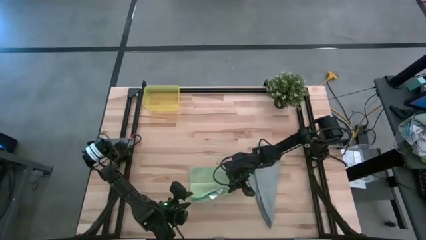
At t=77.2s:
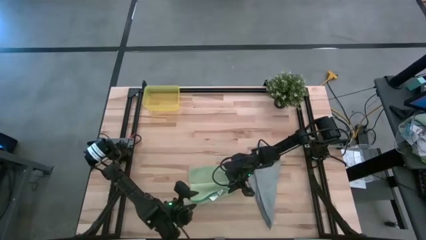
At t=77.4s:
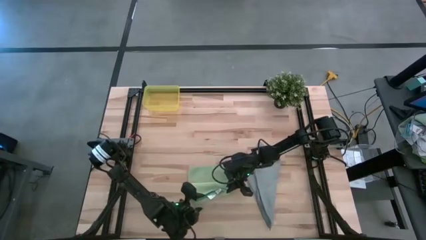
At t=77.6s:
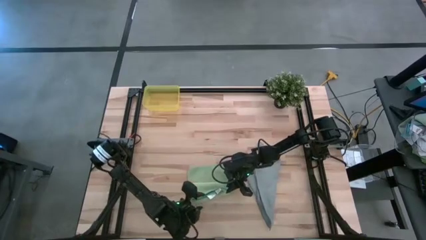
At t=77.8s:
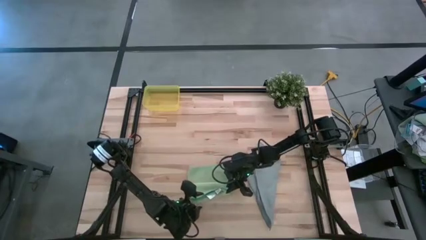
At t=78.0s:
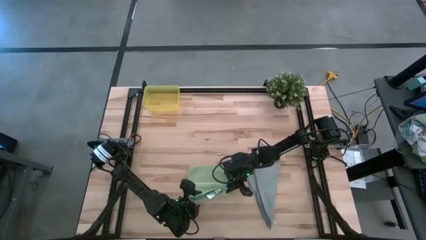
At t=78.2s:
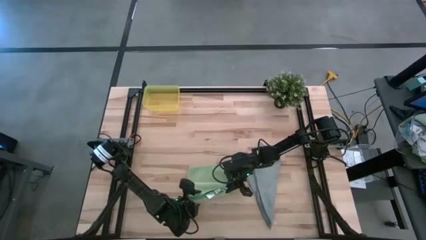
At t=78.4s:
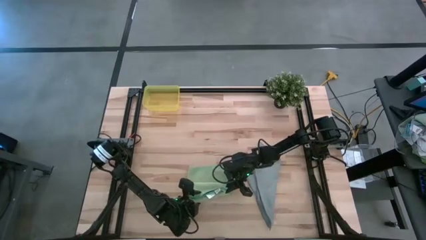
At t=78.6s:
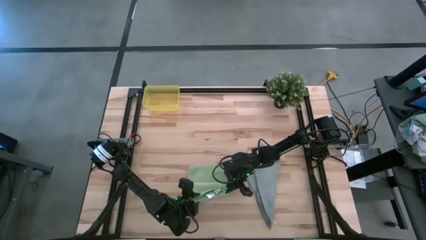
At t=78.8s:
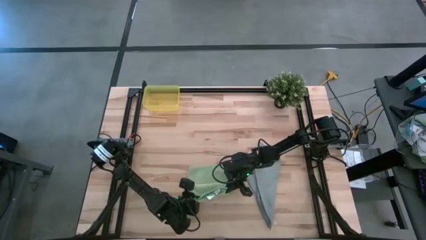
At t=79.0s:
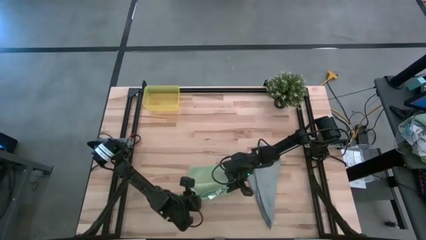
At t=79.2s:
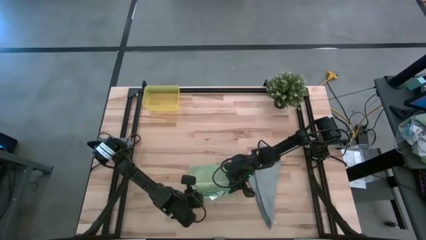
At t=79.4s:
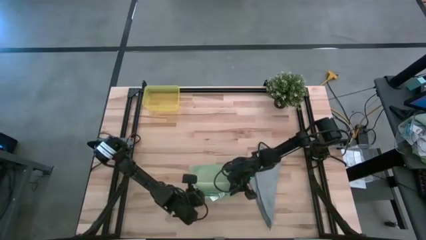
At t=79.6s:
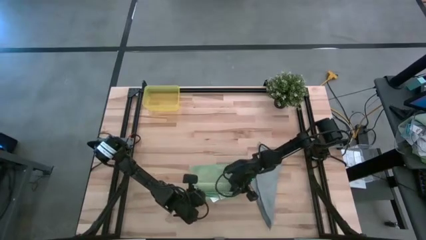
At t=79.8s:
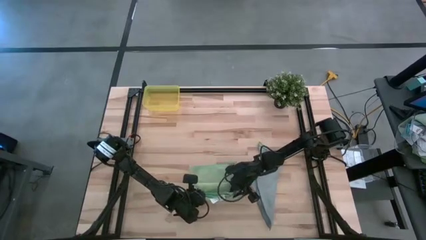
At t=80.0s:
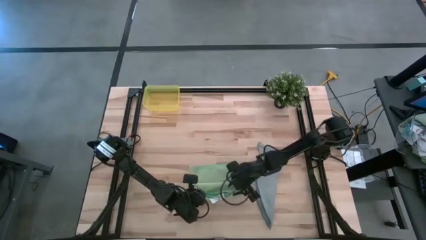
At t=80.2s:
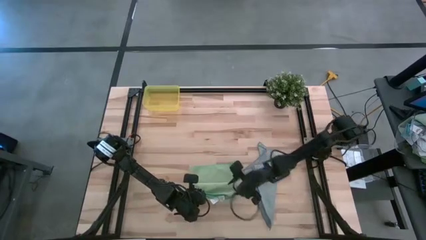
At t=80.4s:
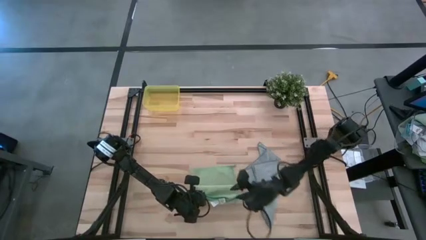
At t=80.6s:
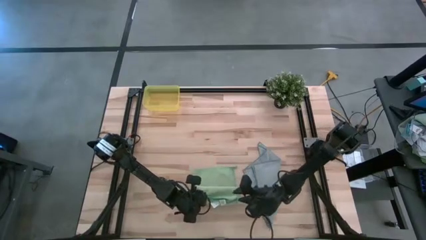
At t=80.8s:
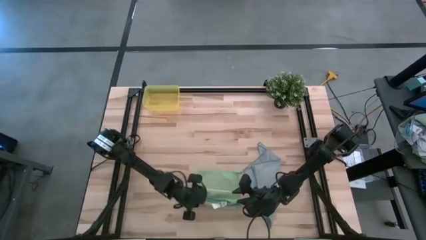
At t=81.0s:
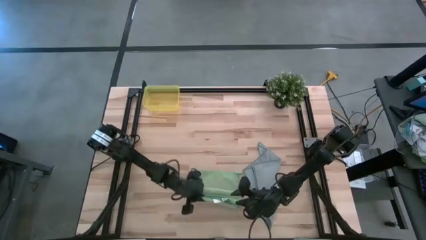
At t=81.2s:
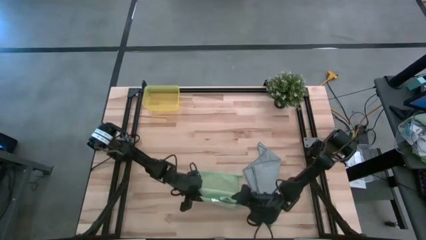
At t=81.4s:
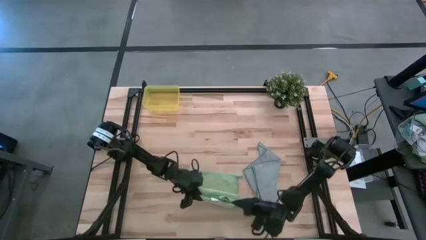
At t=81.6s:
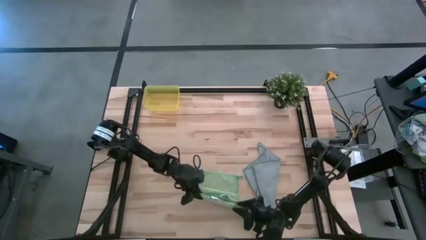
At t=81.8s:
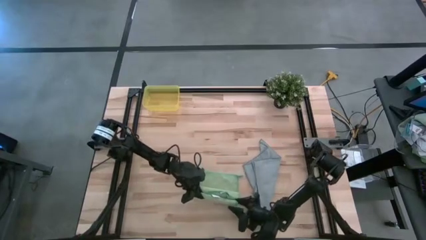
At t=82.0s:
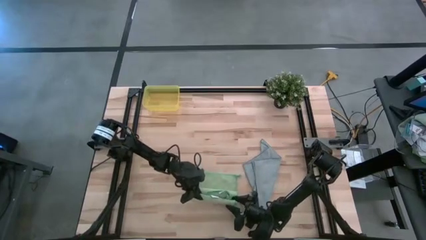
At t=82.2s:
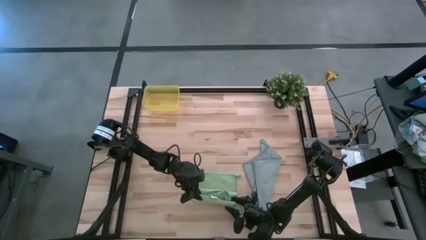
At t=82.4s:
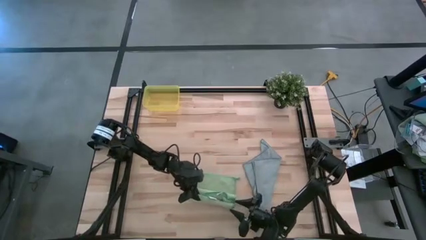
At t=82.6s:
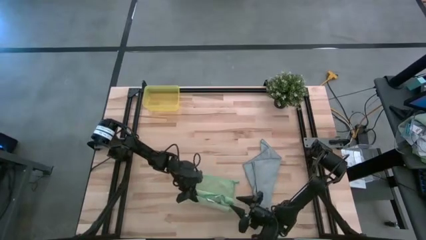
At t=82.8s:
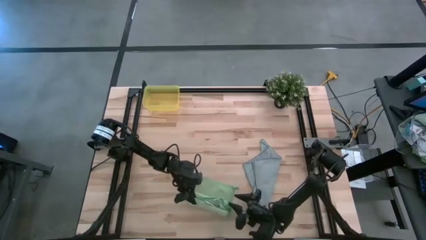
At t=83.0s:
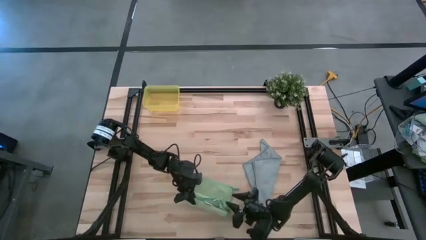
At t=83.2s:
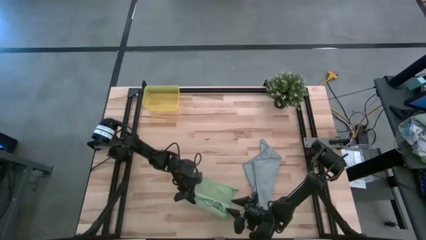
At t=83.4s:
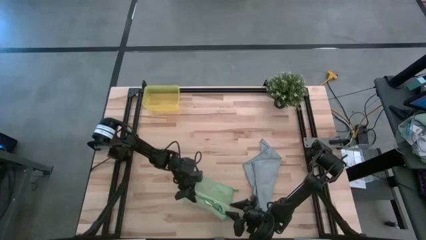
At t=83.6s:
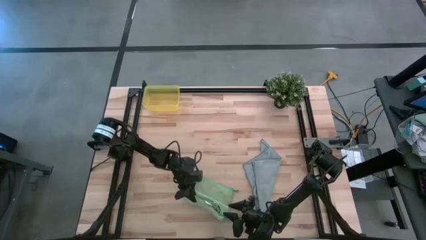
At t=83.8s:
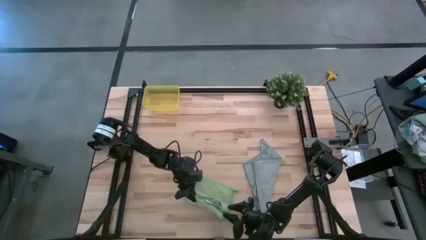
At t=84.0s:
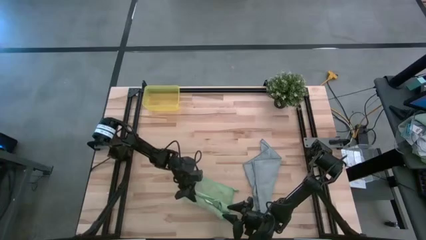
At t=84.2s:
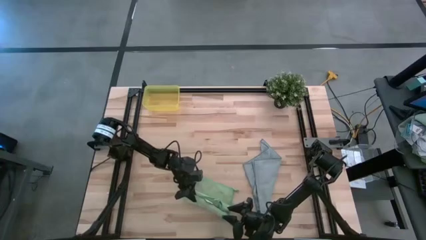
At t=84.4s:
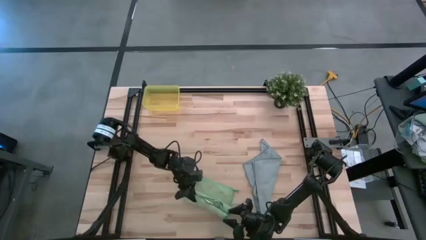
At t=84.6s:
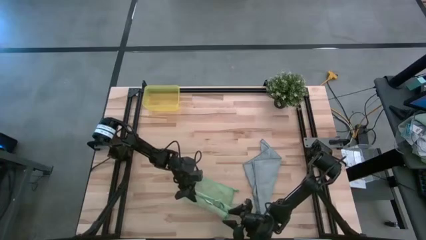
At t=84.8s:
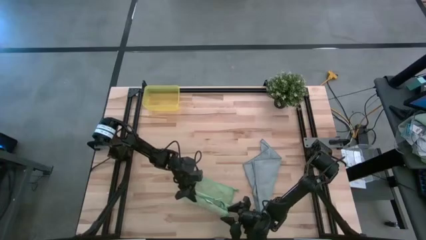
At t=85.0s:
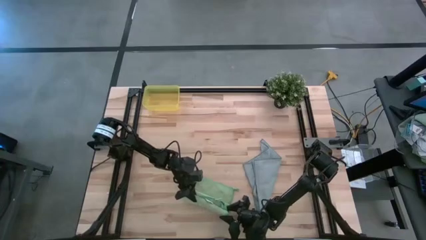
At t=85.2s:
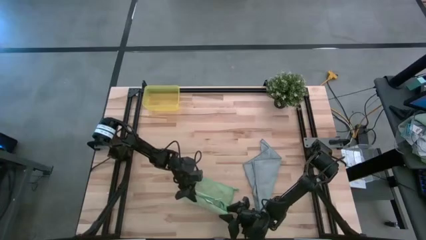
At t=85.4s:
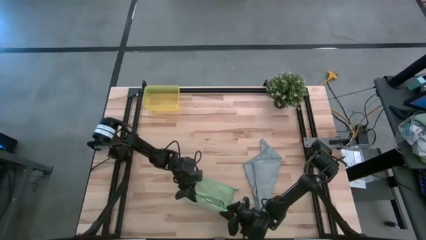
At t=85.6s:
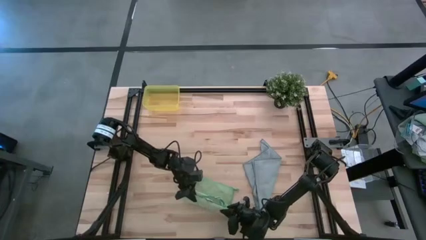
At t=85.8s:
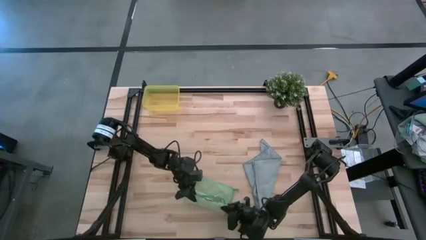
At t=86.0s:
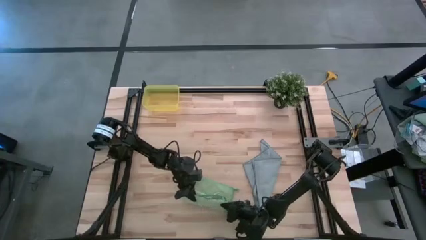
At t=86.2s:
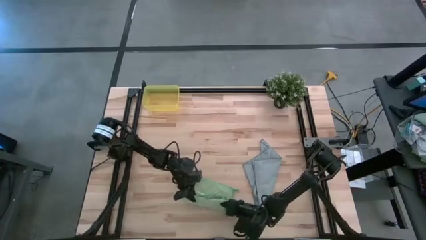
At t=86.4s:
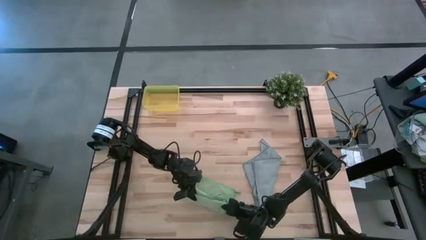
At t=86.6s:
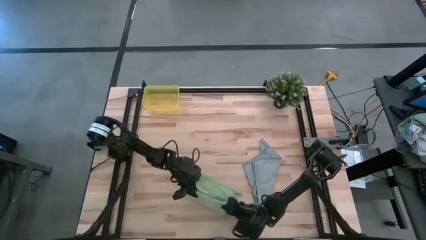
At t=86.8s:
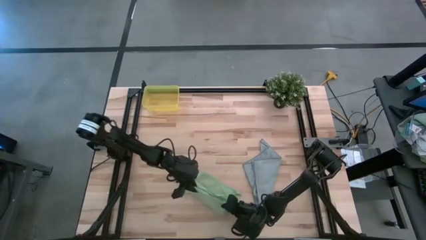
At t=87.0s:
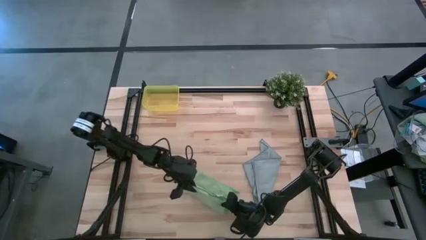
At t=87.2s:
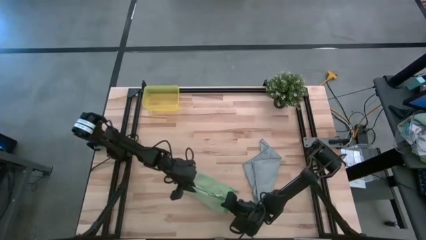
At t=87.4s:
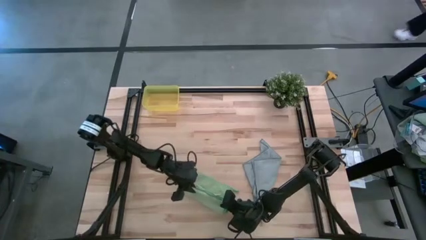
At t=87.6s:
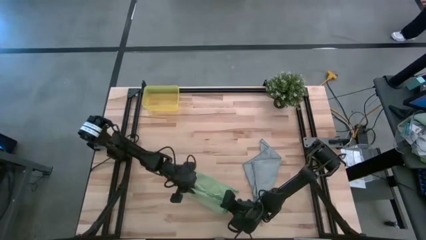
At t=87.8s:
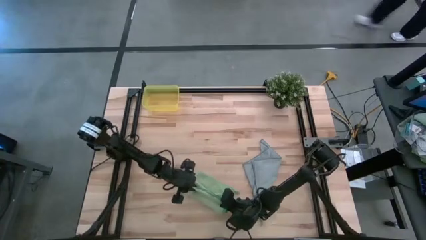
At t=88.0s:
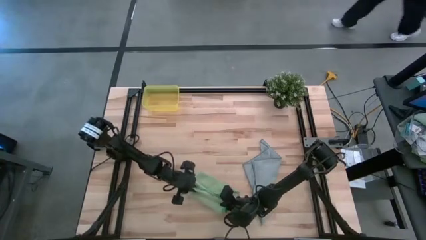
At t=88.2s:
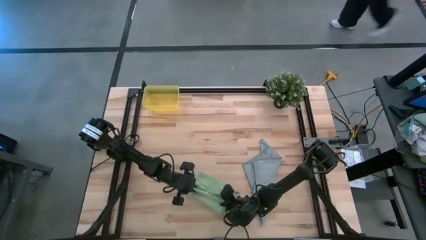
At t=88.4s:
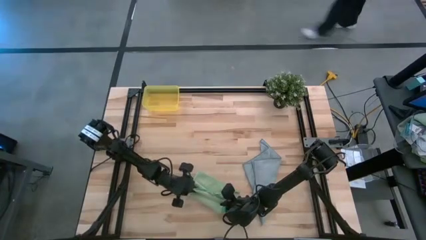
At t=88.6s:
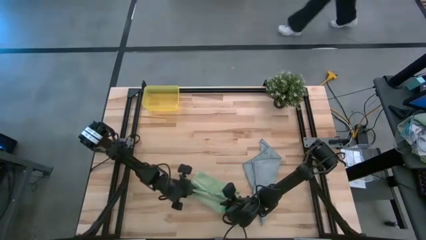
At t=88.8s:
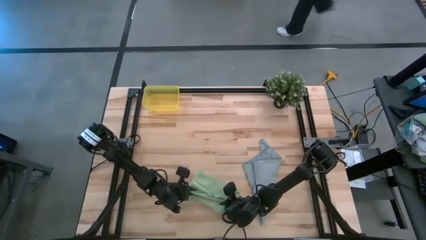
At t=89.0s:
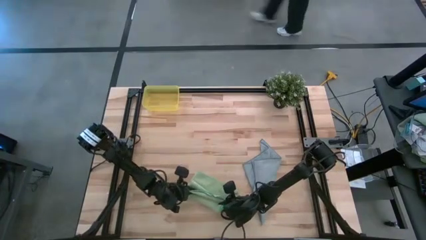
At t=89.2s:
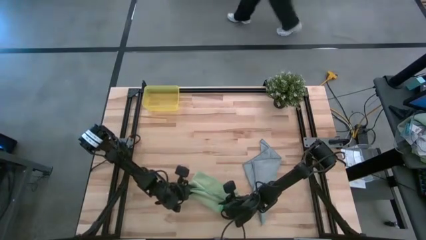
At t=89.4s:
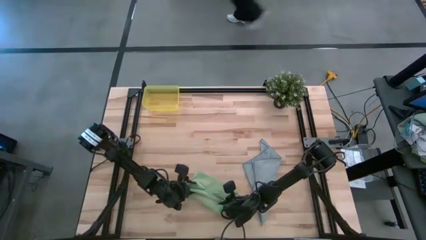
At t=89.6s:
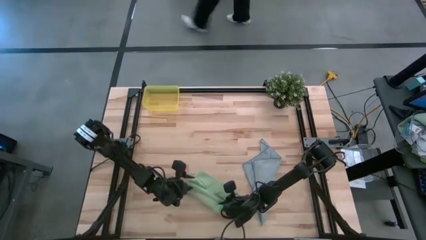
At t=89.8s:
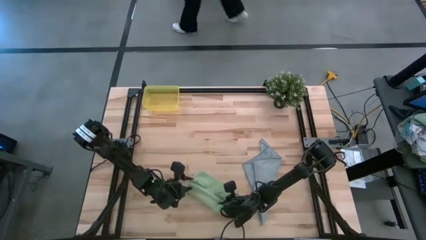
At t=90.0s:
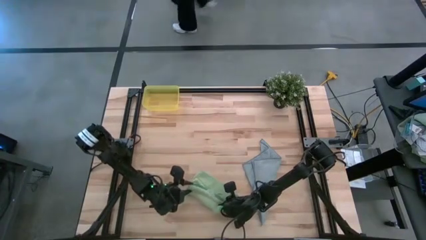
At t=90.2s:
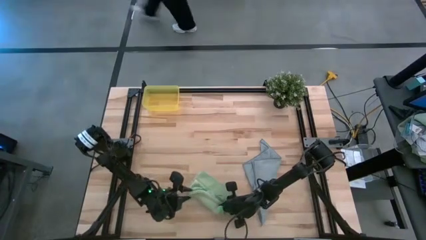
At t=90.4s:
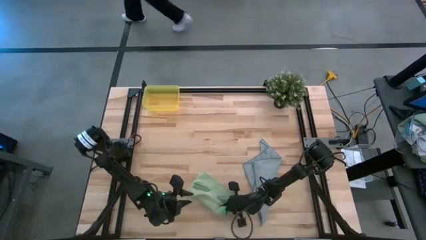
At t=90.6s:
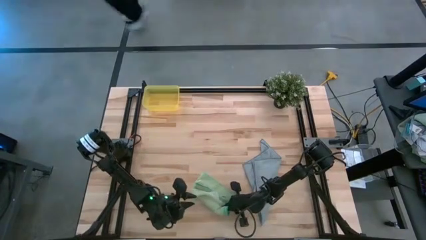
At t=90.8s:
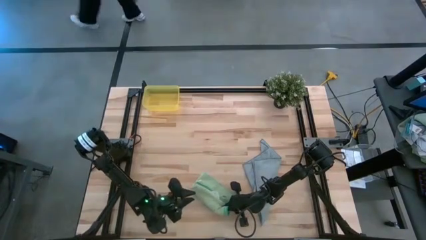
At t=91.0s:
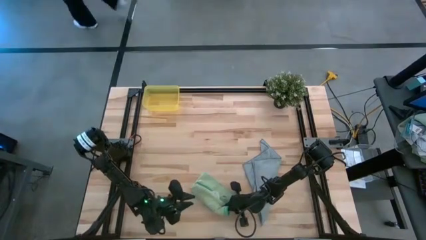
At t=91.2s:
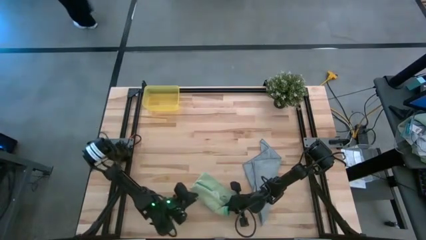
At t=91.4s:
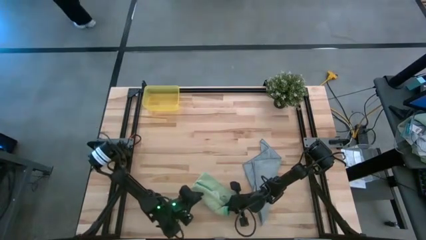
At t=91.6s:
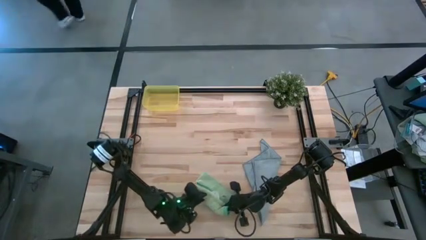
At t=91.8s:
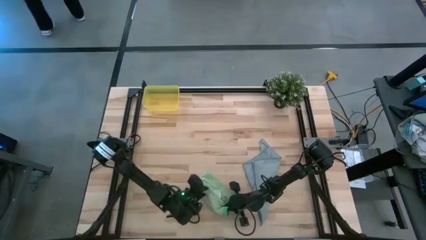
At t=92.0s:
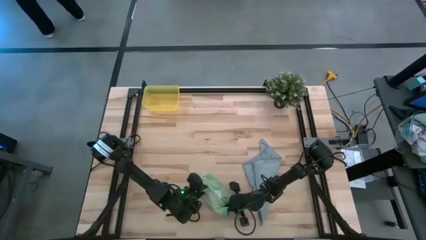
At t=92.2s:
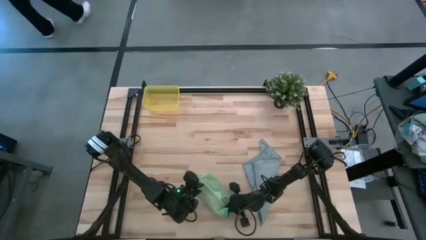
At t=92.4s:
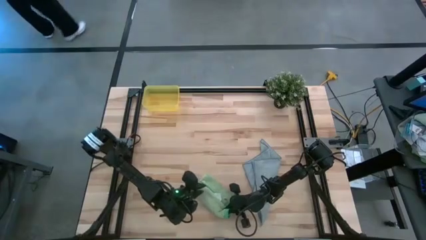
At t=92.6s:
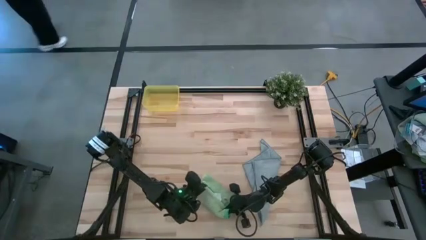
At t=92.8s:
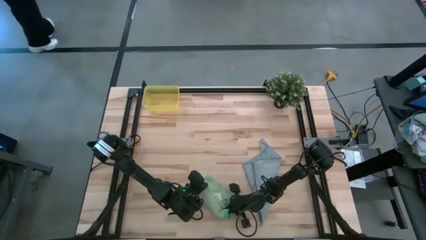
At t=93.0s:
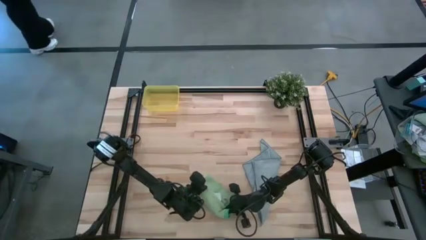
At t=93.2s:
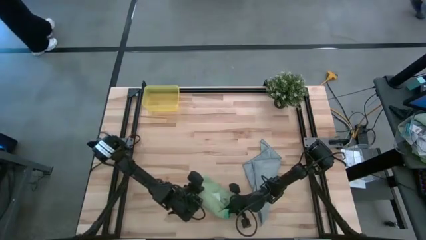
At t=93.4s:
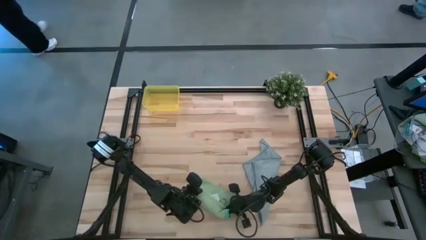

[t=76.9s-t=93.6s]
Task: Roll microfiber towels into tight, uniform cylinder then place into a basket
Roll the green towel
